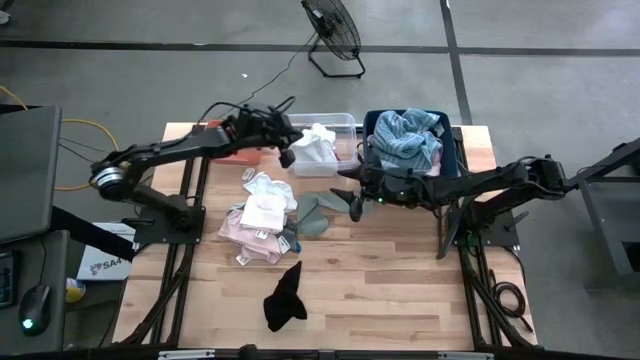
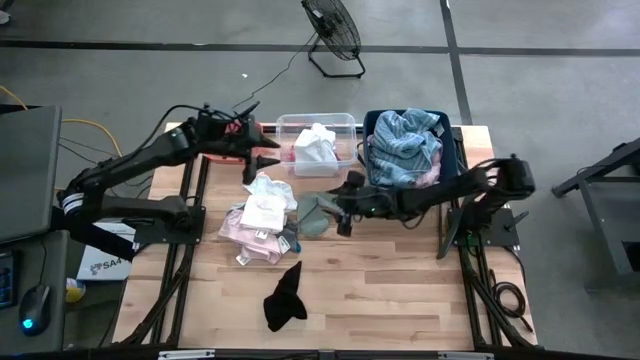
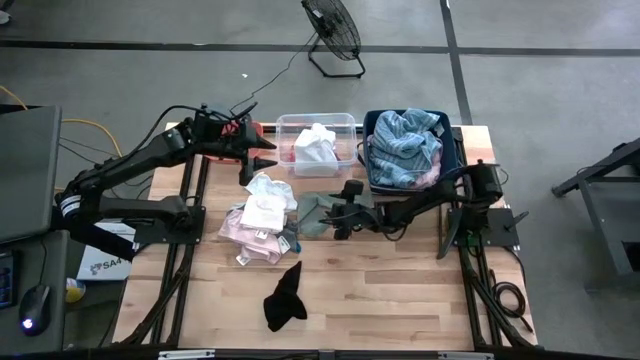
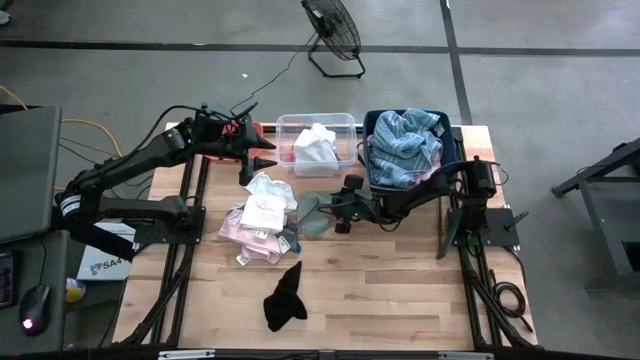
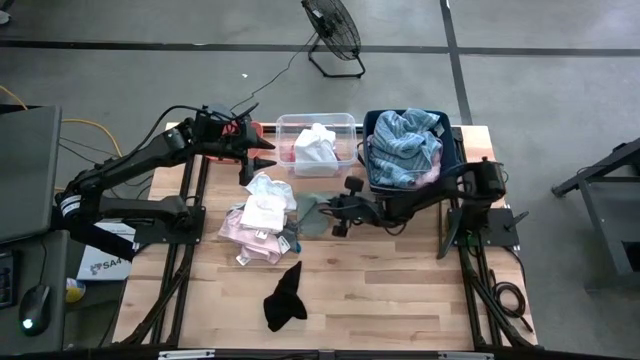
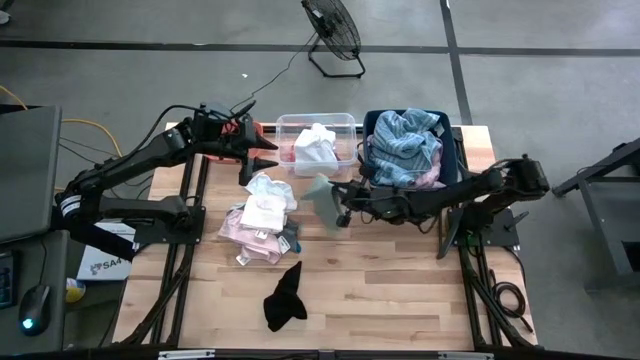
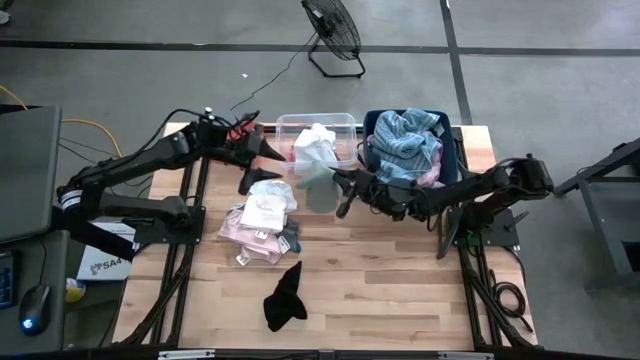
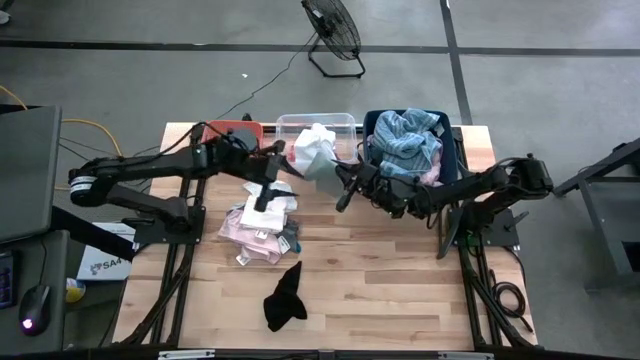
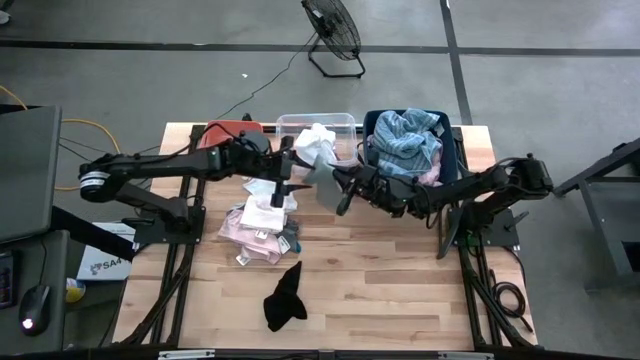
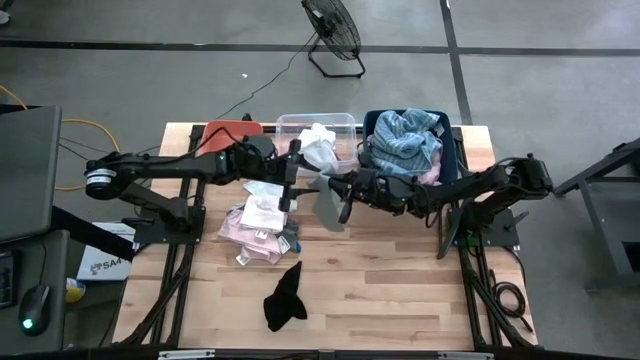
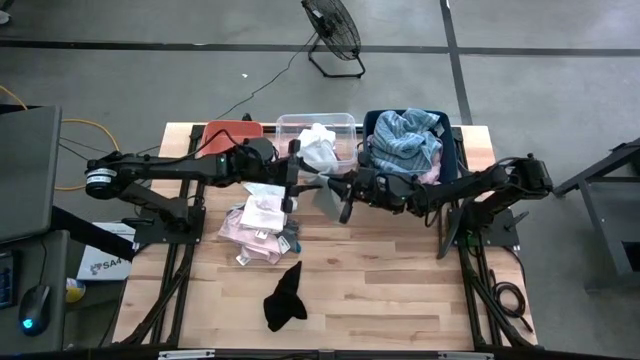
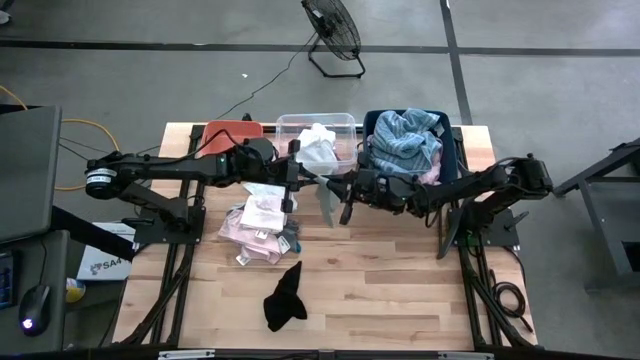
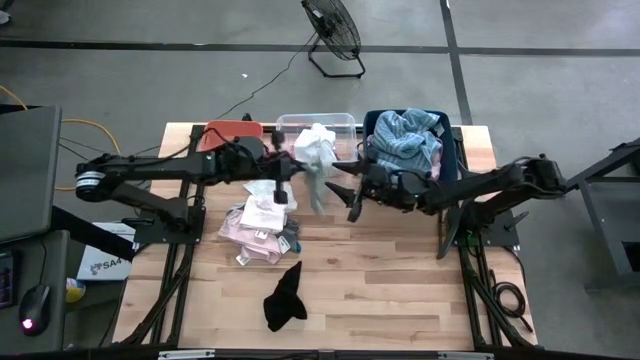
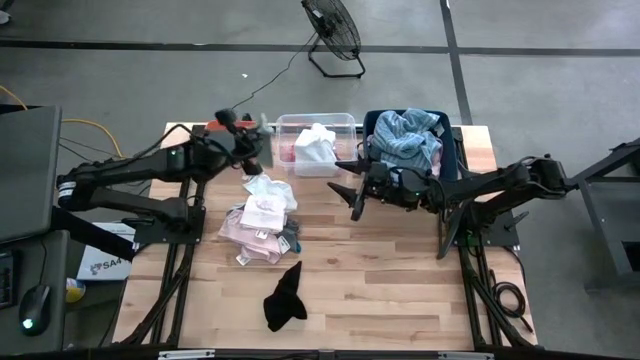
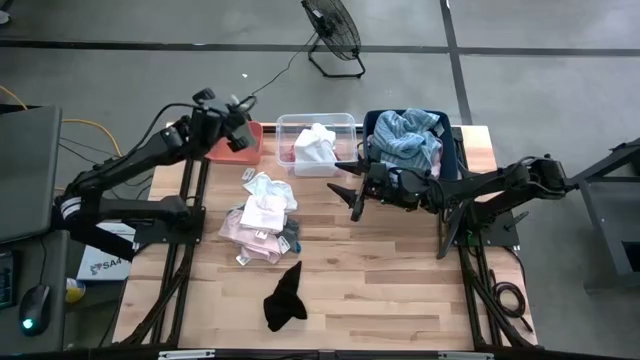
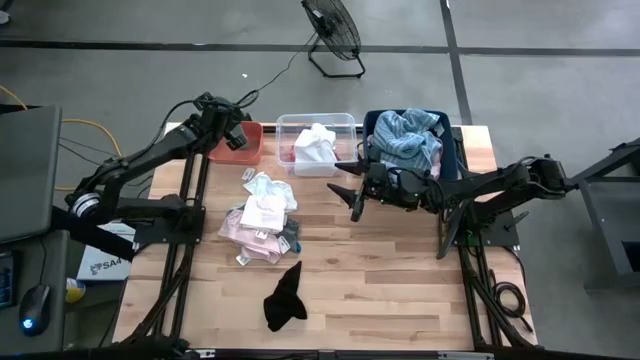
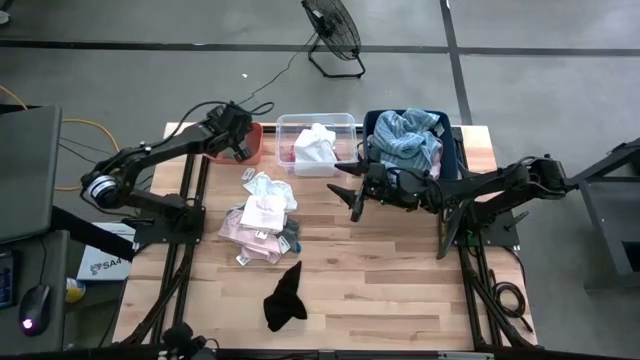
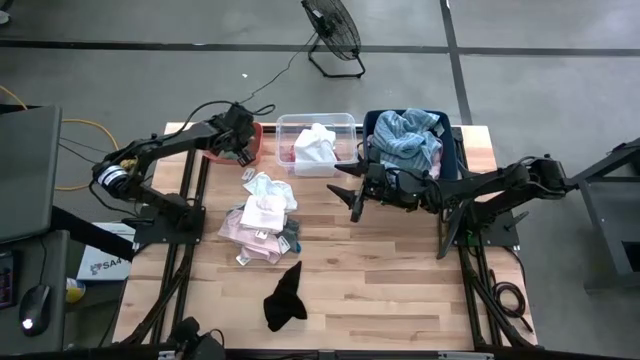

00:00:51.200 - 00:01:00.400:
Task: Pick & Place Cloths
Put the green sock into the orange bin

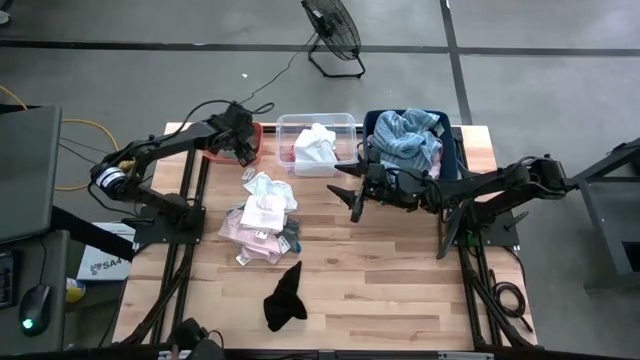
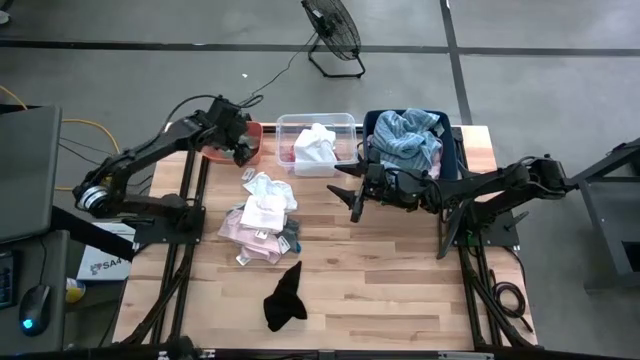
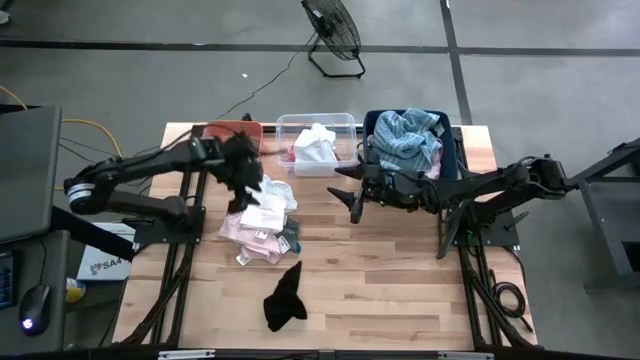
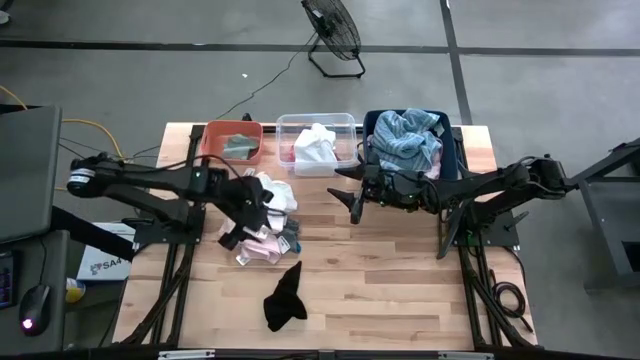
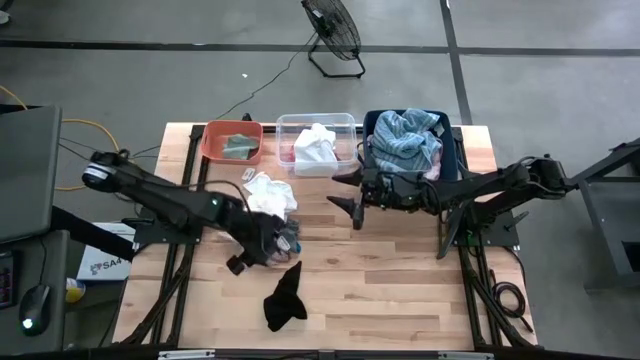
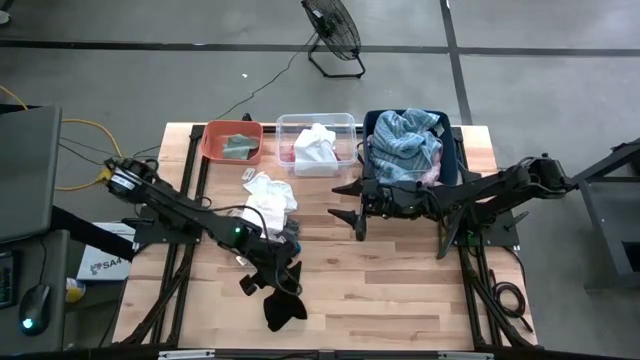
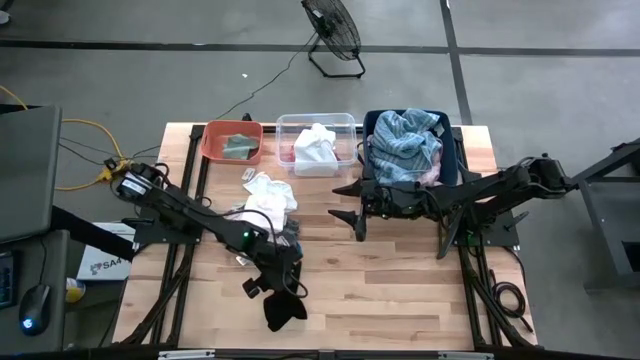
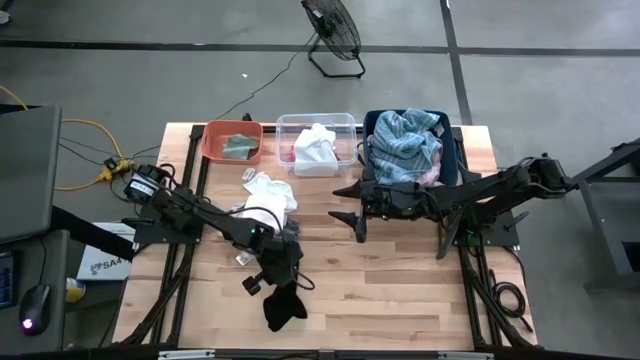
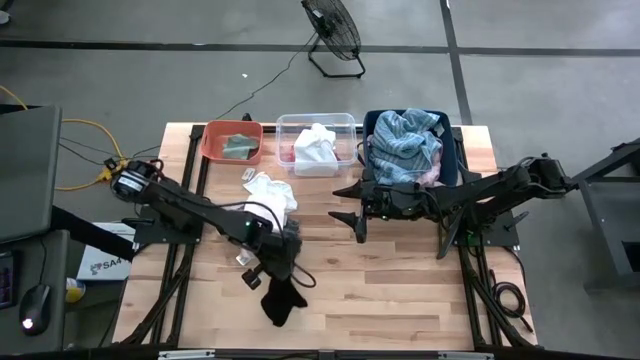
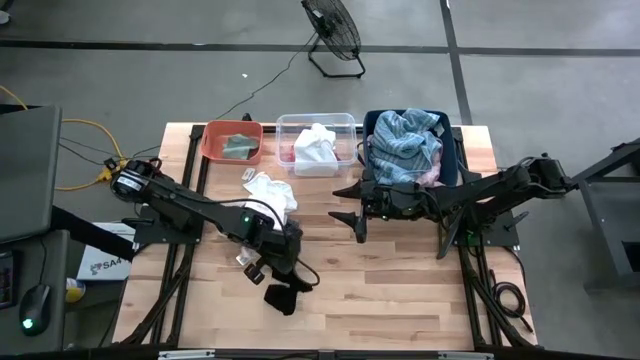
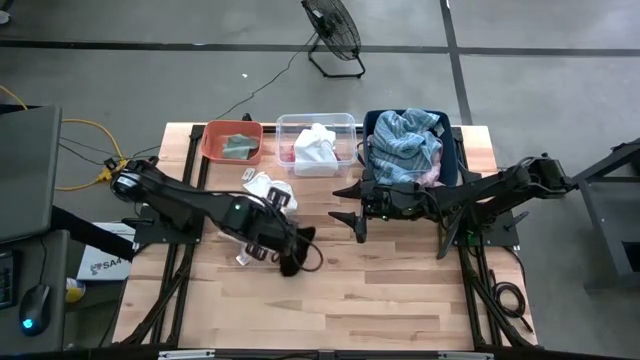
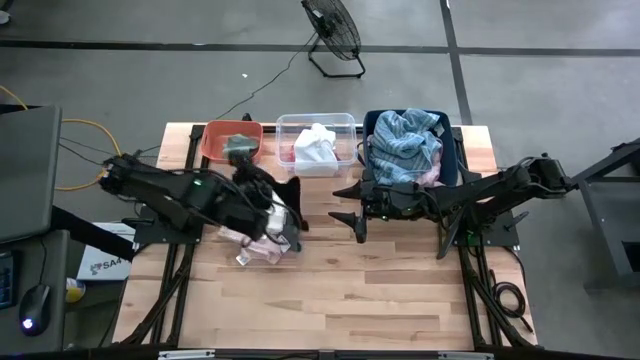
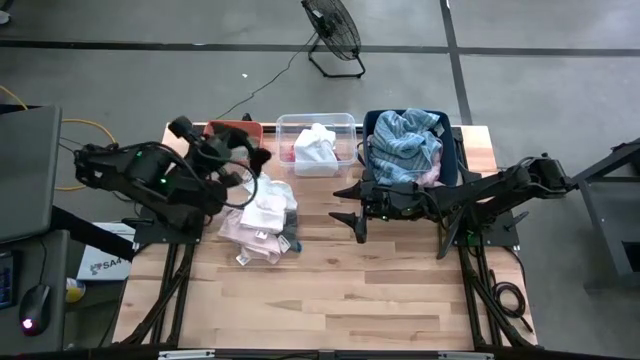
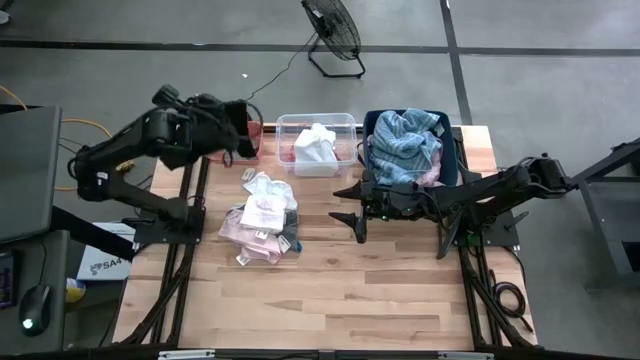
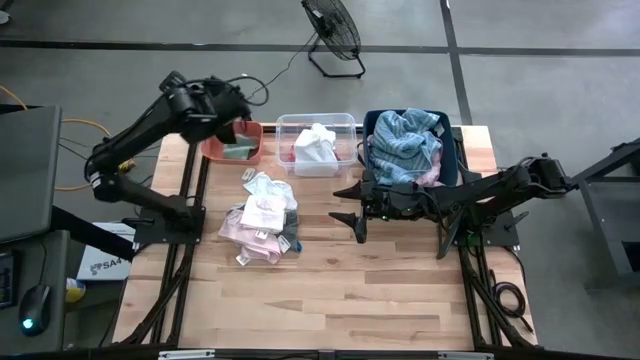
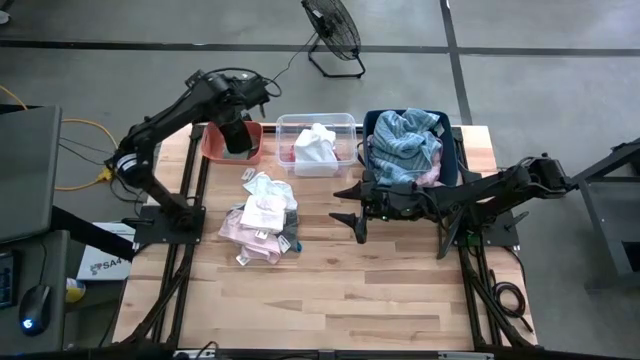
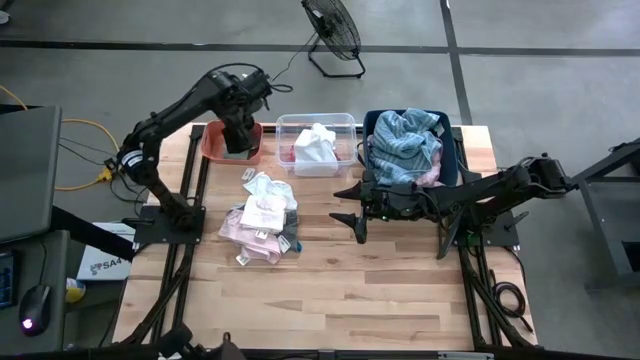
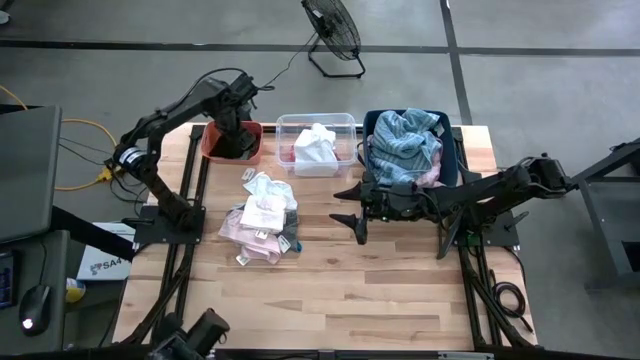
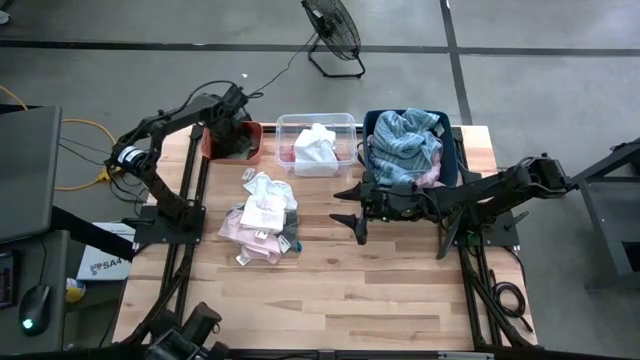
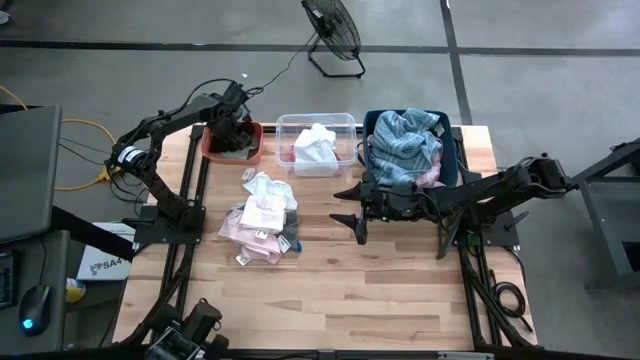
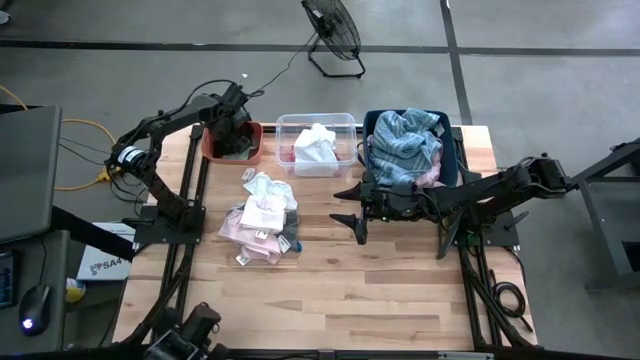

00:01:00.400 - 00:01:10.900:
Put the black sock into the orange bin

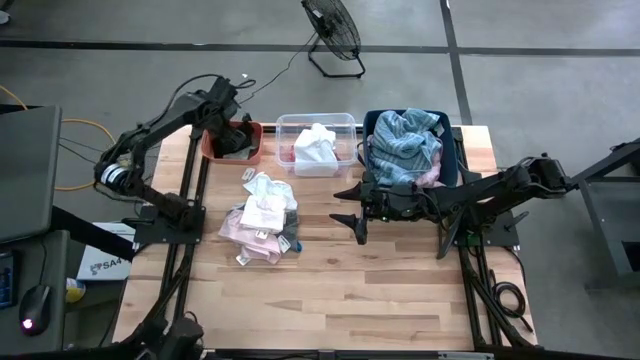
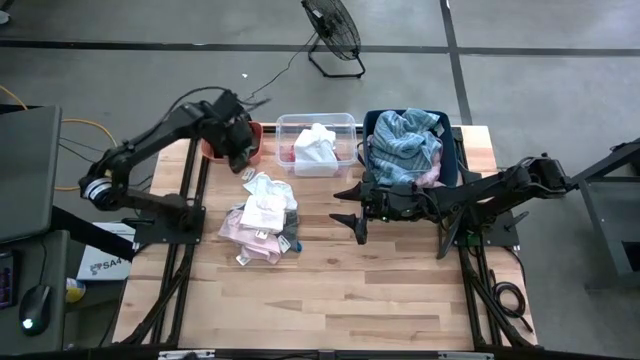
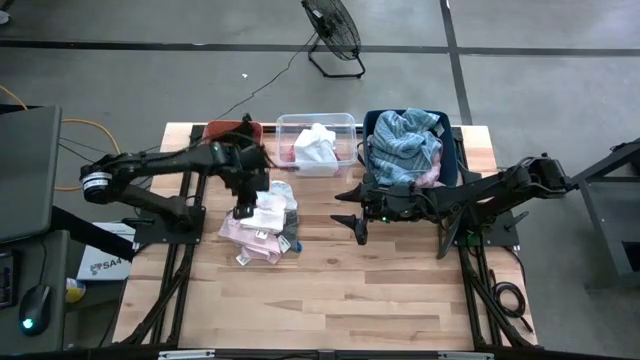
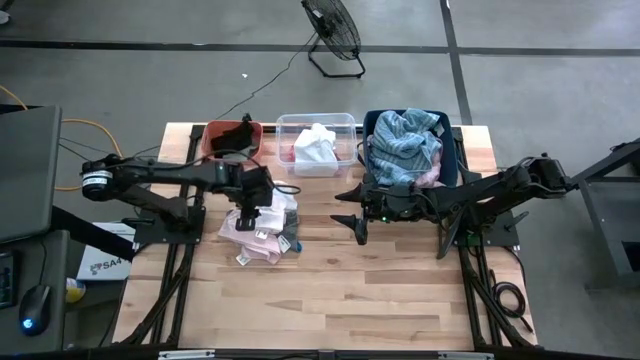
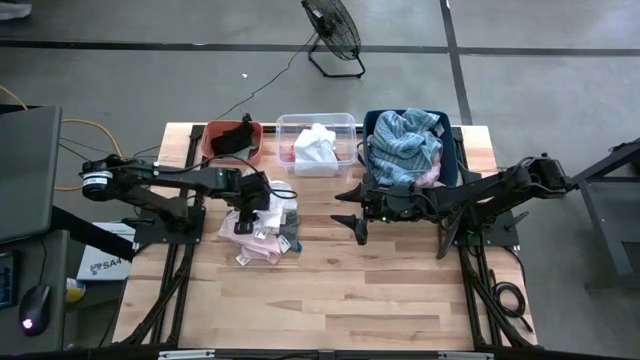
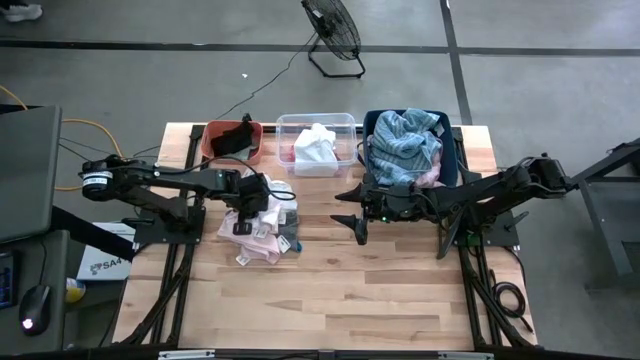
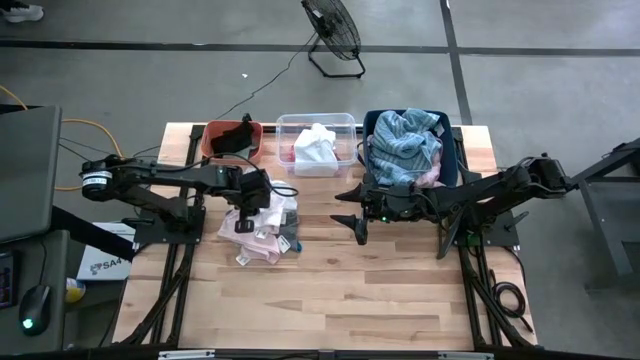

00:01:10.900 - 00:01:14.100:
Put the white underwear into the transparent bin
